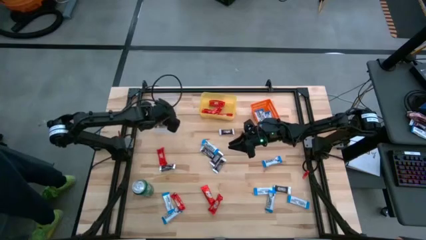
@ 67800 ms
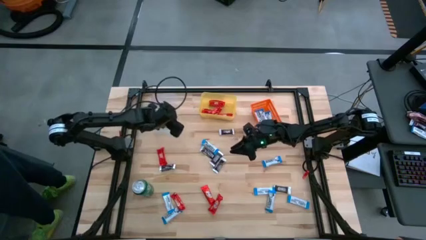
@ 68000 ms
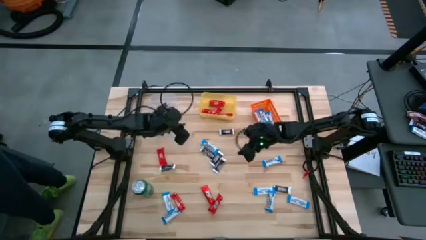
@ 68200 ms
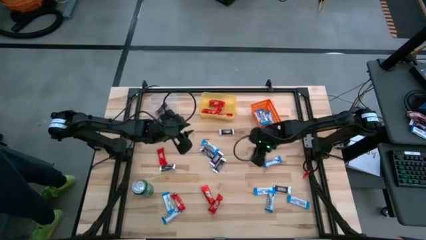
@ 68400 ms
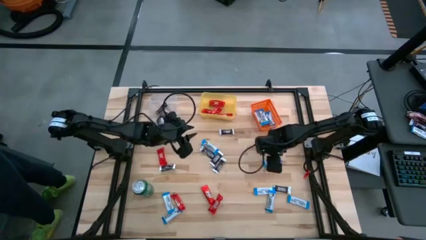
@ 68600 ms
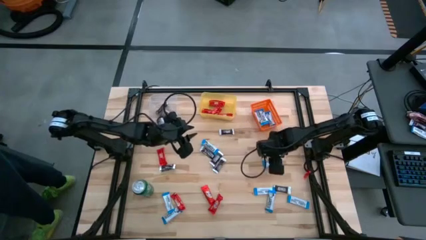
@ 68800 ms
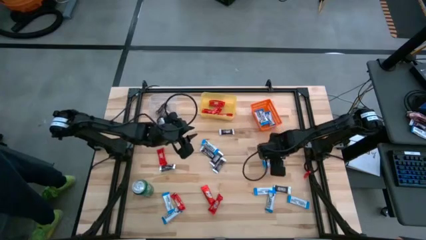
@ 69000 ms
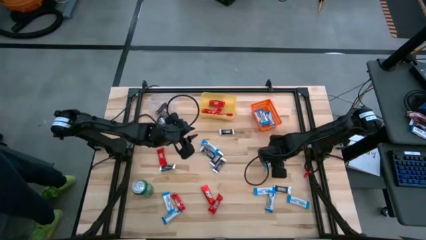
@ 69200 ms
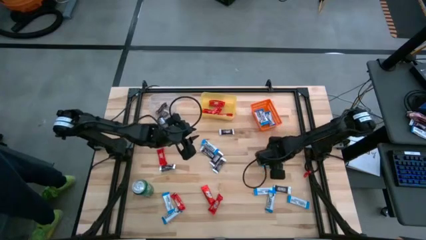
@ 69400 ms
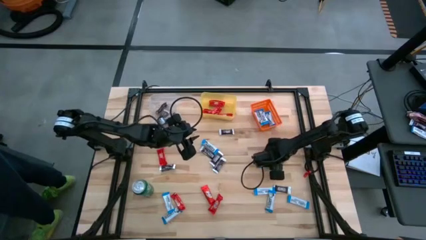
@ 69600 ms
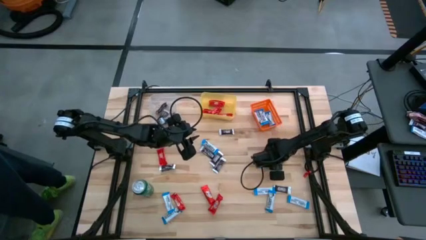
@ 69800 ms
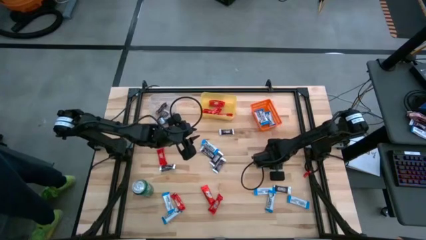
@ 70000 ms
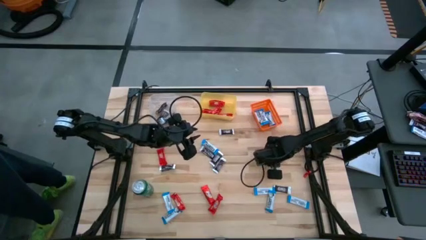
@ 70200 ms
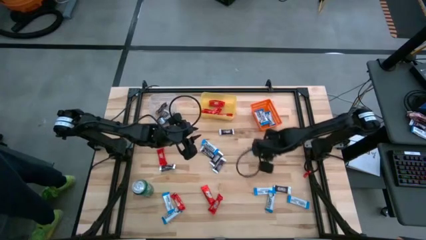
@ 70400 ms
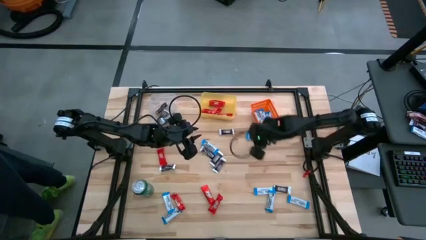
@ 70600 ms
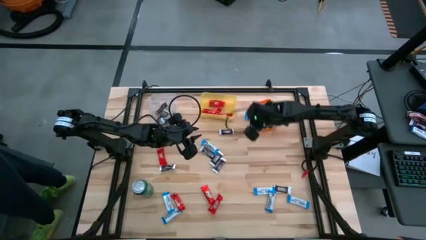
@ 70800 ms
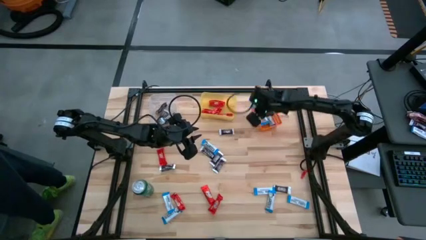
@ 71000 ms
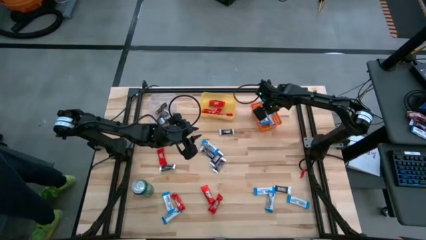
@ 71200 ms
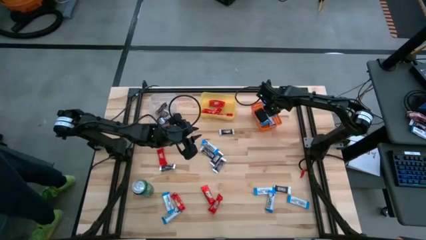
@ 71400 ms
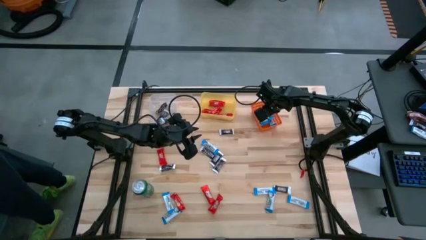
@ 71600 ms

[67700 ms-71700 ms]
Task: Sort candy
Put the white chocolate bar into the orange bin

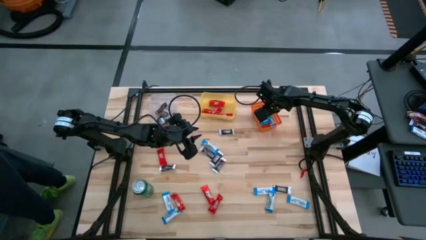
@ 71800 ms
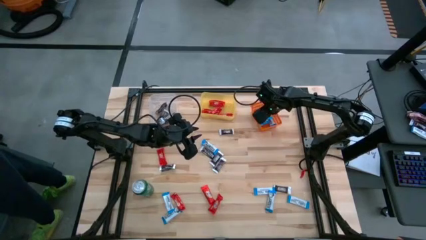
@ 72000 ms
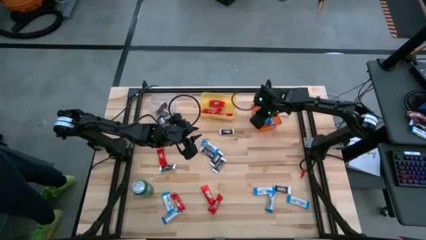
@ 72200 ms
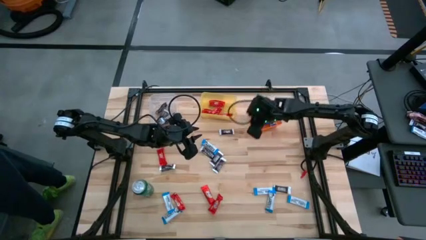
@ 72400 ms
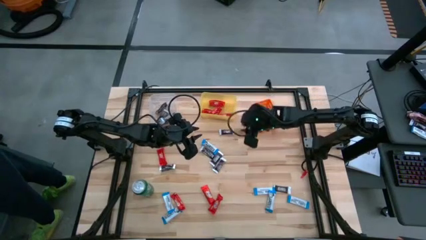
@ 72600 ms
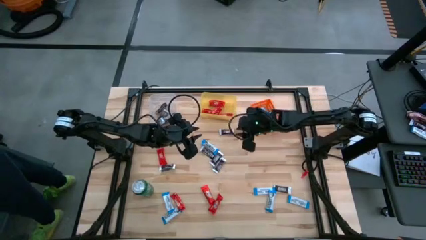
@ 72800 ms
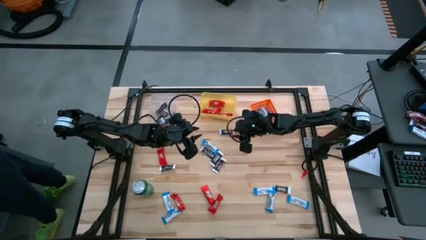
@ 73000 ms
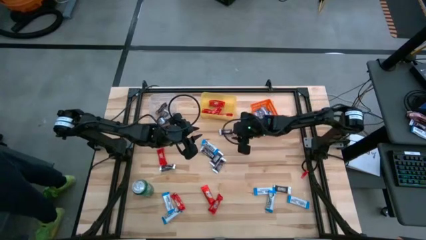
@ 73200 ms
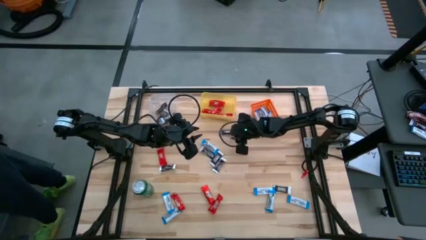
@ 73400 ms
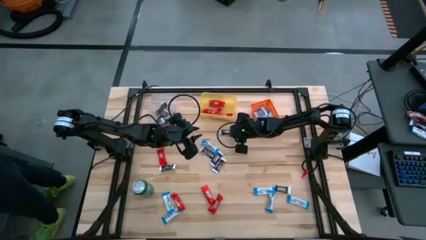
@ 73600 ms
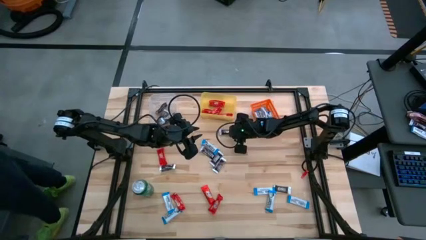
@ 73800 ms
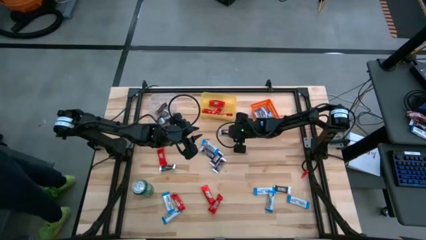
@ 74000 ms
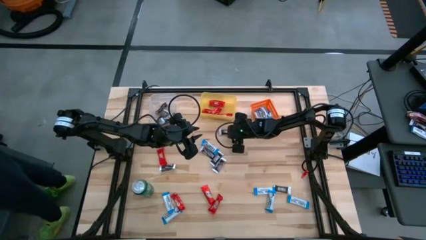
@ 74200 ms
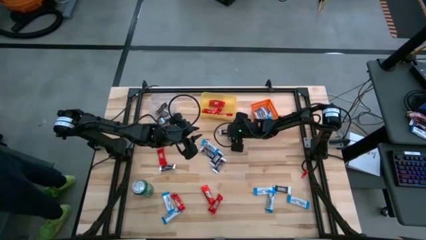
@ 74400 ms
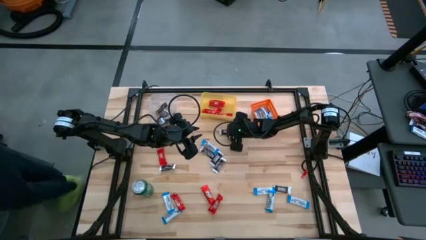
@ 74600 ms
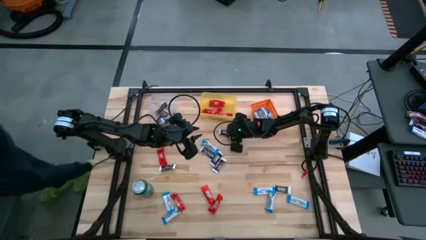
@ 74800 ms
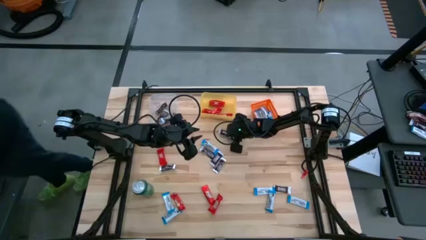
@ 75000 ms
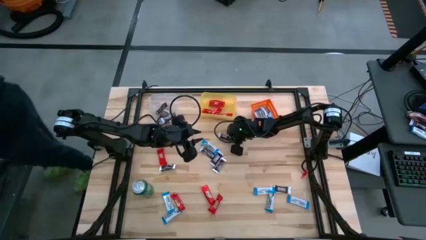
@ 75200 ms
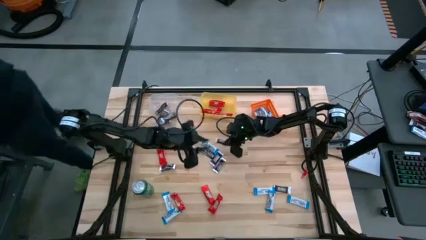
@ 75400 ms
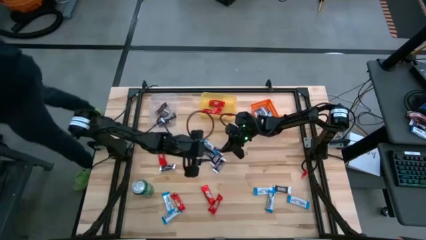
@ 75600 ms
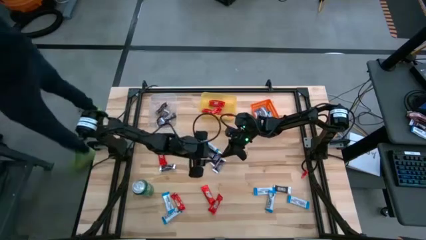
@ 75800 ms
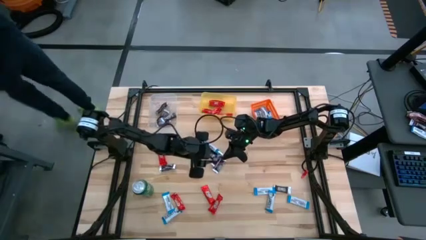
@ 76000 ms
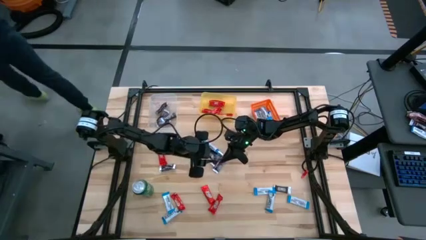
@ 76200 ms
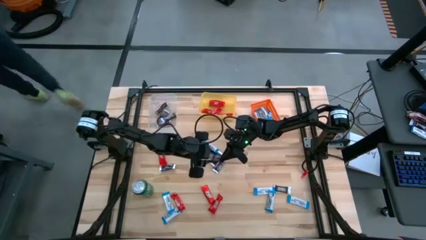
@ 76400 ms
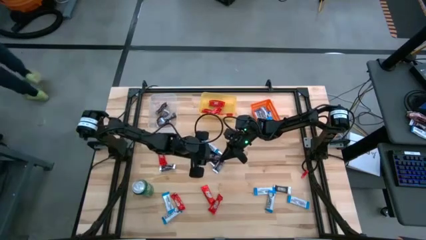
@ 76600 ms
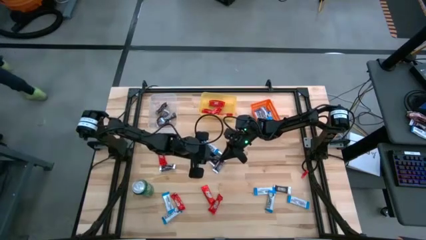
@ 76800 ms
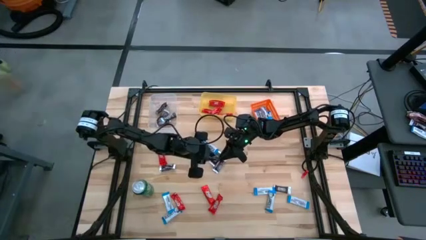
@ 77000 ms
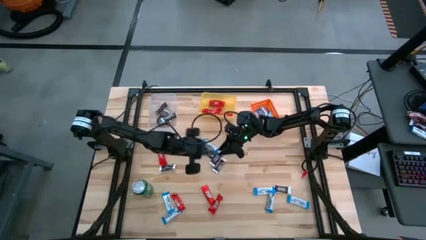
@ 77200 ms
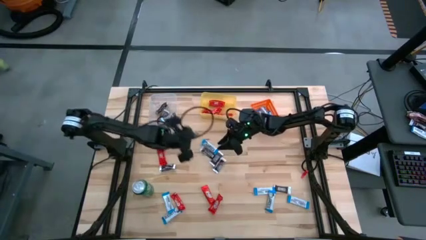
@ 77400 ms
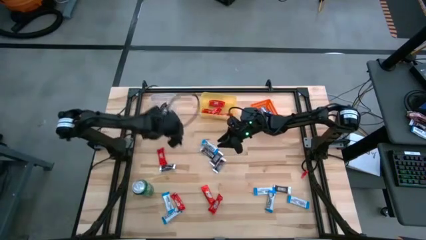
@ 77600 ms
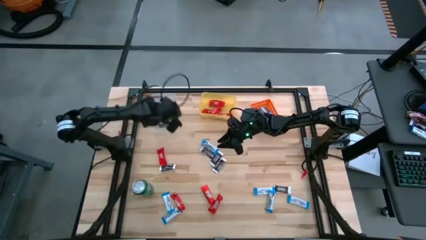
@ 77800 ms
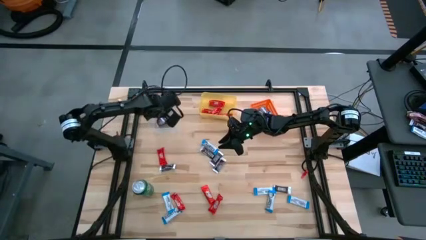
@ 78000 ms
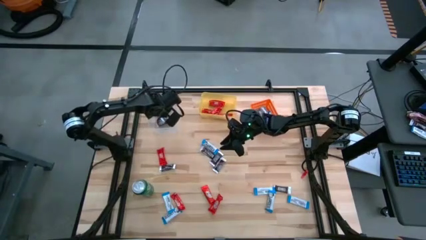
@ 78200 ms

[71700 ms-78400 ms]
Put the brown chocolate bar into the transparent bin

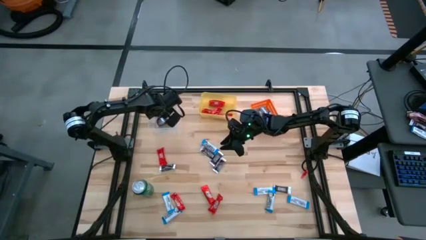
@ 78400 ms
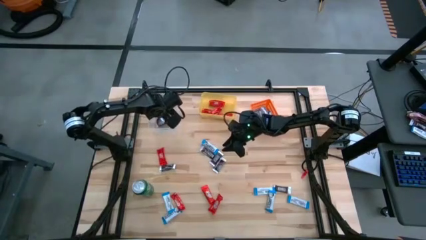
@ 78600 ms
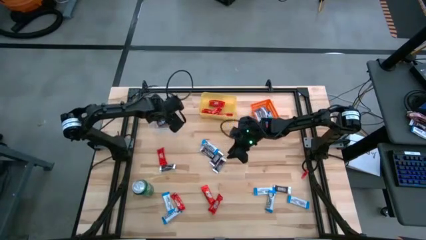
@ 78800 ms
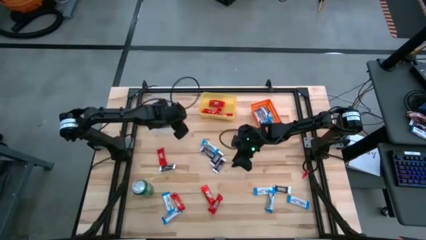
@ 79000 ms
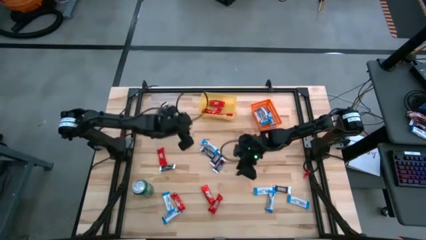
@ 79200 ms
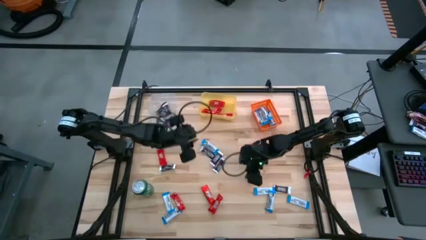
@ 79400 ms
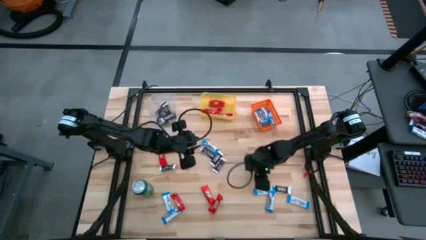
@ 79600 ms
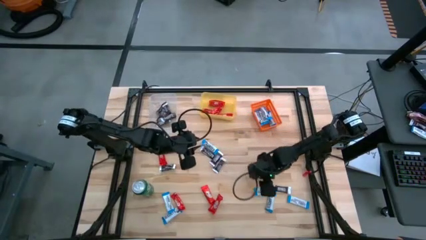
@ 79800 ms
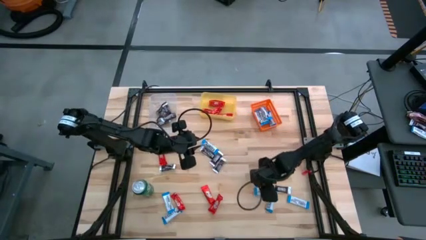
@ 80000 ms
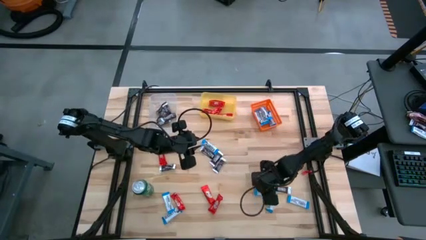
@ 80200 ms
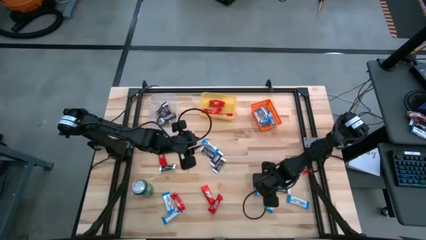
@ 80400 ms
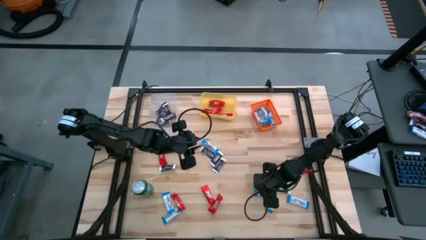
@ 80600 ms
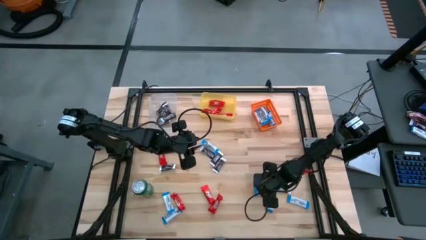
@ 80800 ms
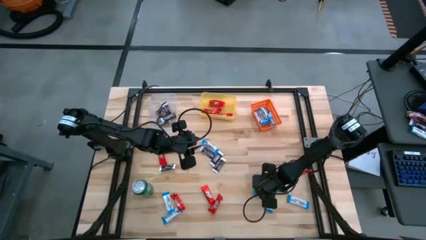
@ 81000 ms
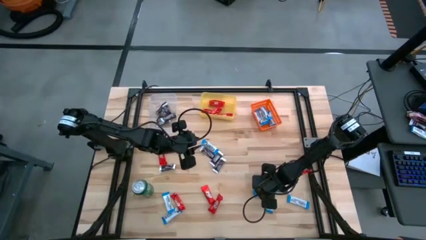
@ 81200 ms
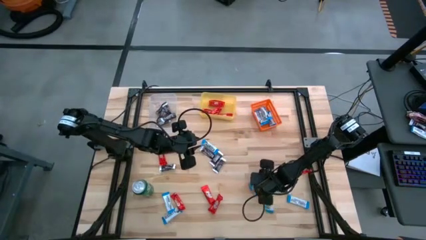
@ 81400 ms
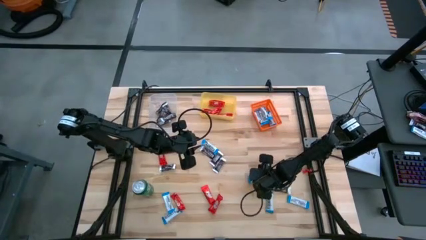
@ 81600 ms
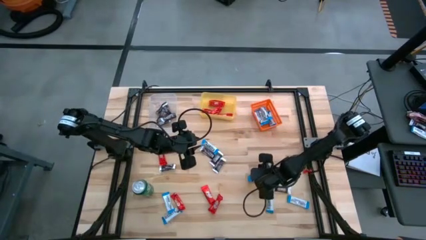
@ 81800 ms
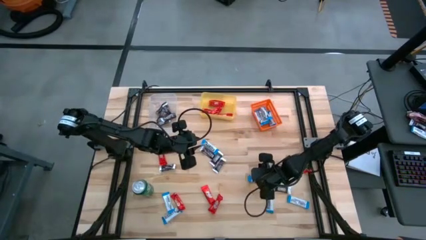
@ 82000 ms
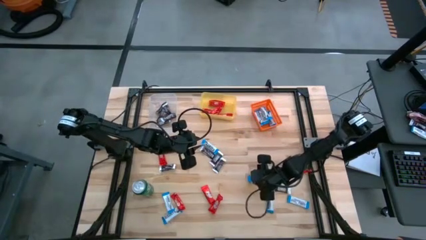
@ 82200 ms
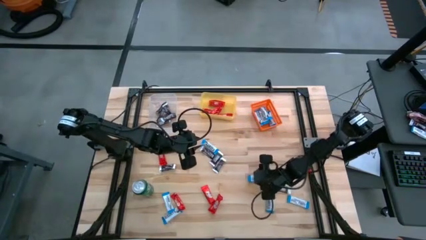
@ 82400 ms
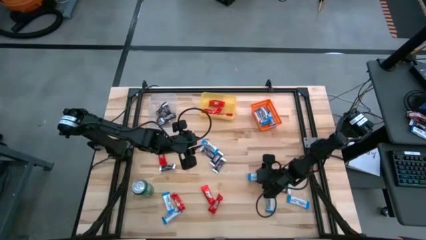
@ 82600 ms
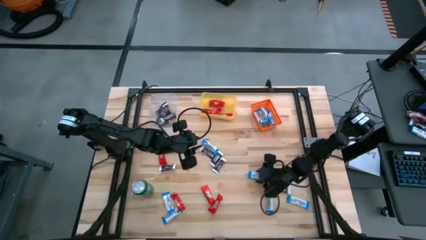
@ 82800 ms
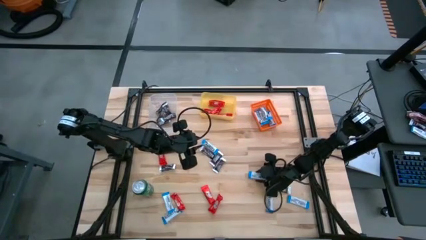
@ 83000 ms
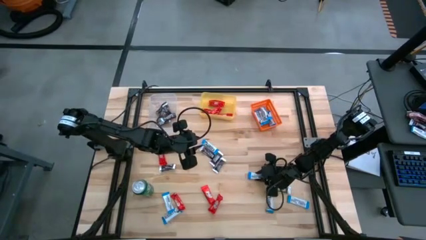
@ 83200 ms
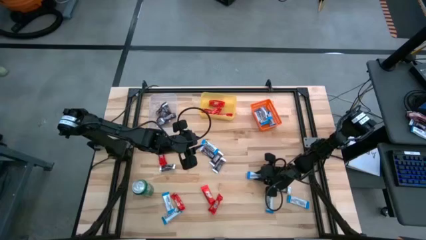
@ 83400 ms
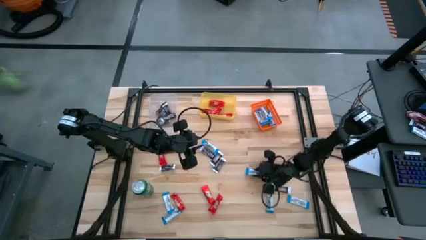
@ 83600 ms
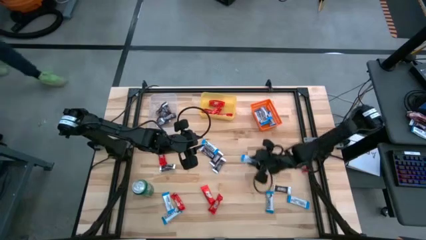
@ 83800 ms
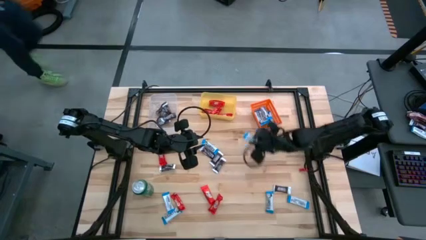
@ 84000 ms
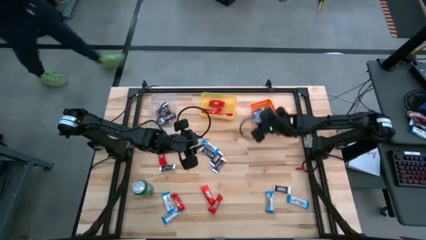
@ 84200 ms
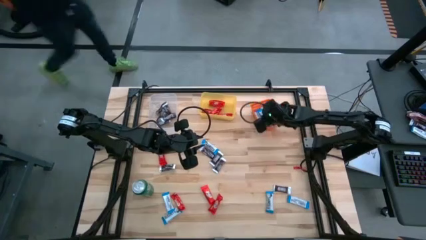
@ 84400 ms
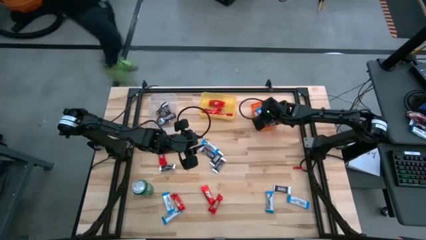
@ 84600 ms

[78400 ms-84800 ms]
Put the white chocolate bar into the orange bin
